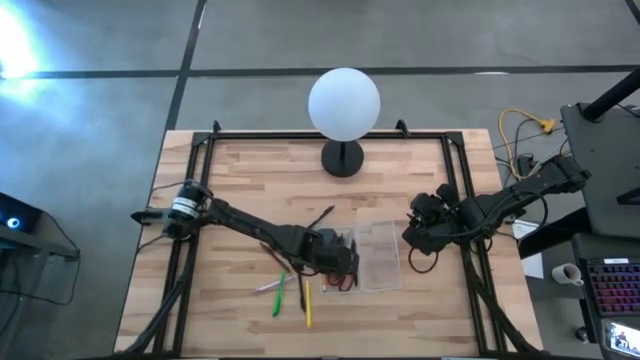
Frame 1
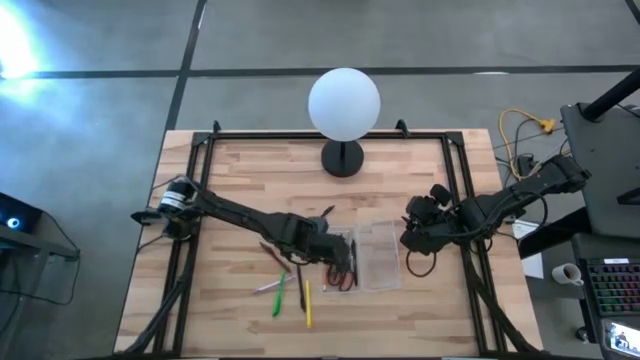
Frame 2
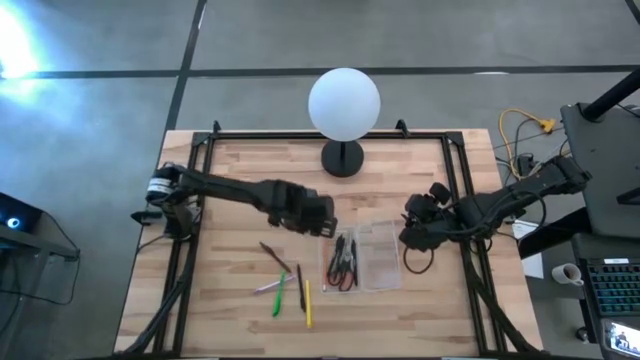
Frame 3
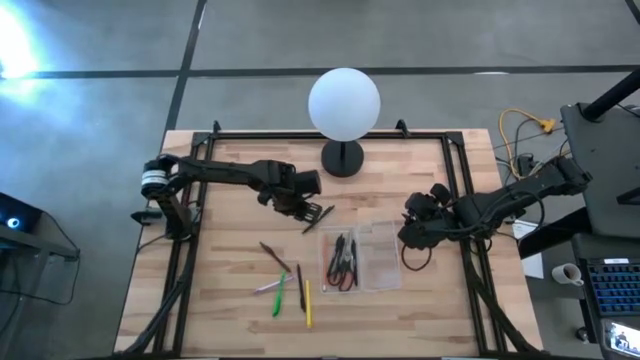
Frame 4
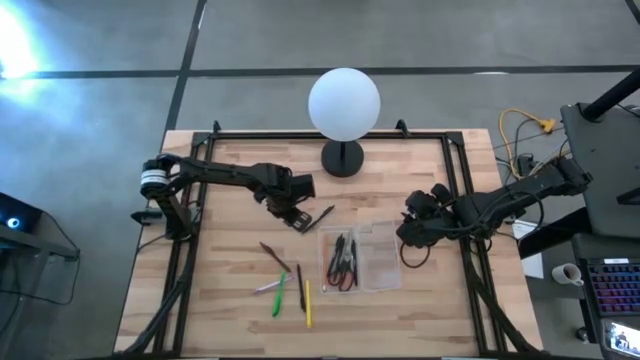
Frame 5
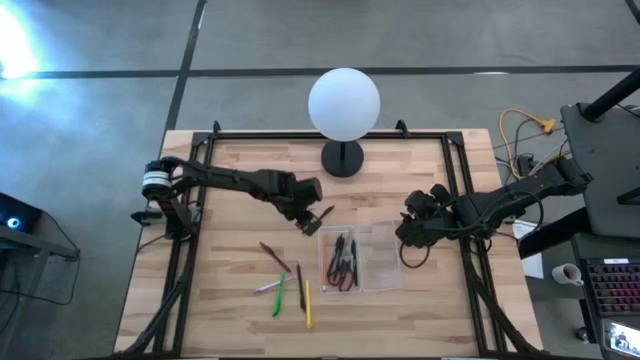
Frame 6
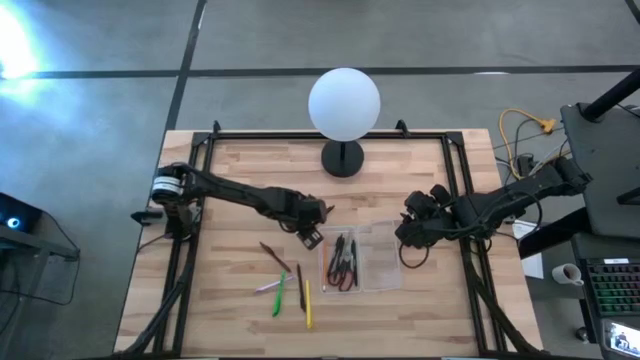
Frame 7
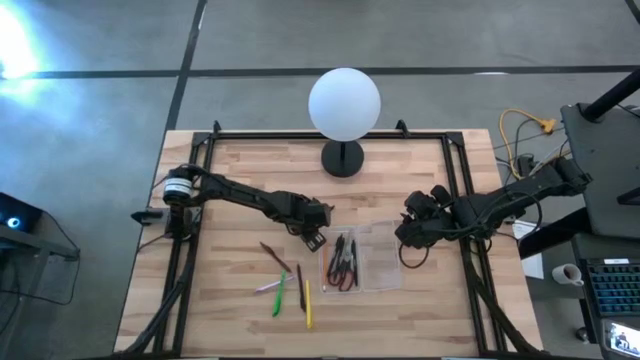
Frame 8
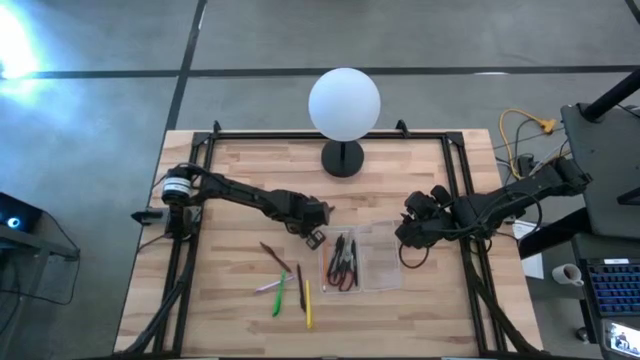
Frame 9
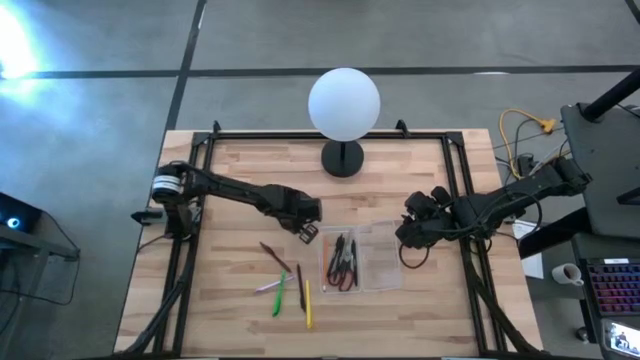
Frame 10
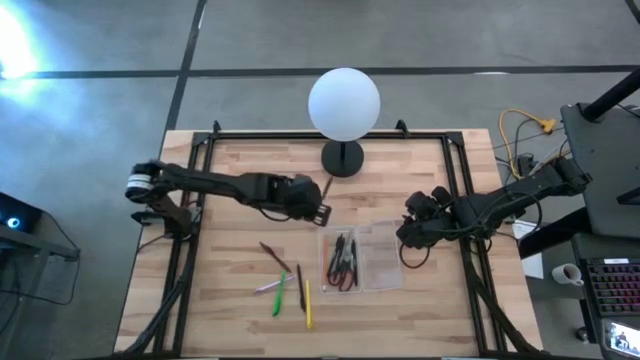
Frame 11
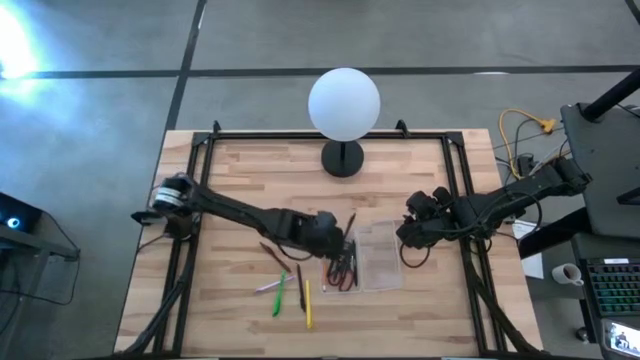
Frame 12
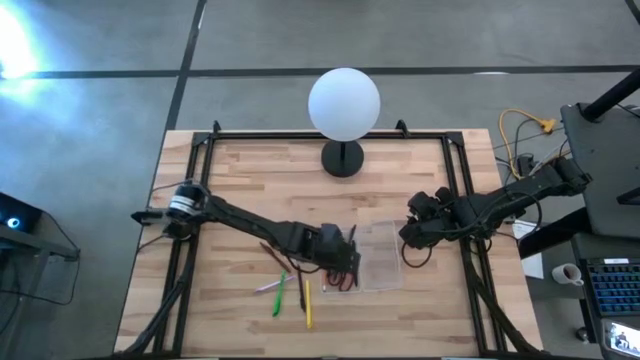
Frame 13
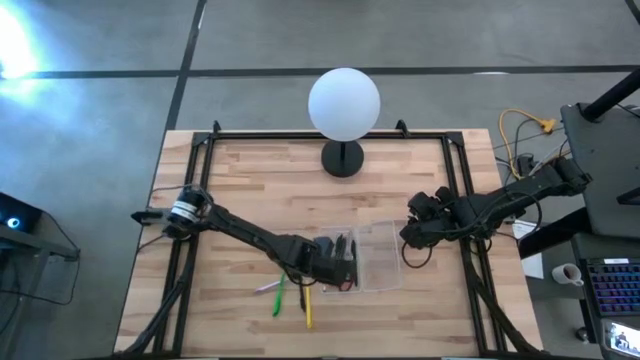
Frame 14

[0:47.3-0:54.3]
Task: Pick & place school supplies into a supply box
Put the top black pen into the transparent supply box

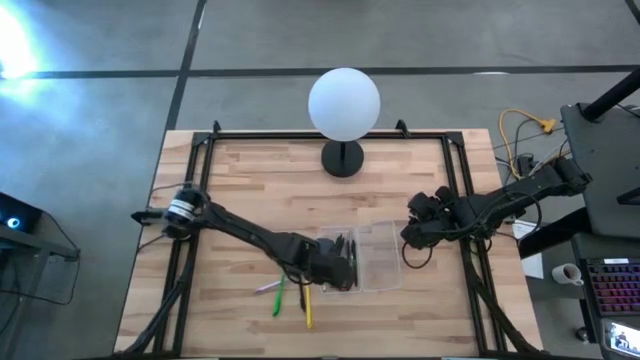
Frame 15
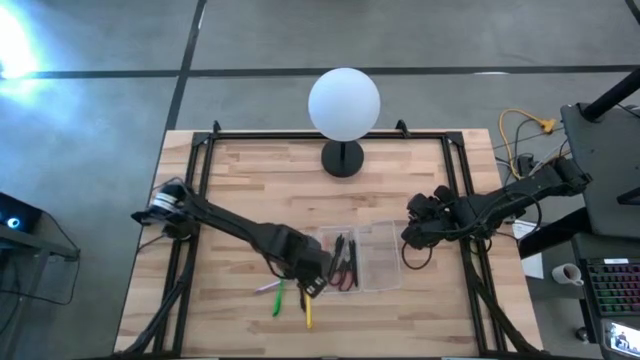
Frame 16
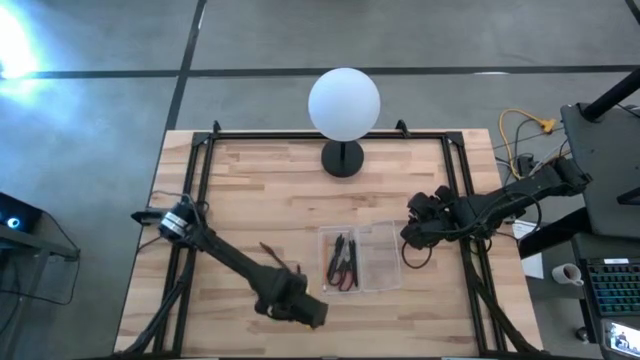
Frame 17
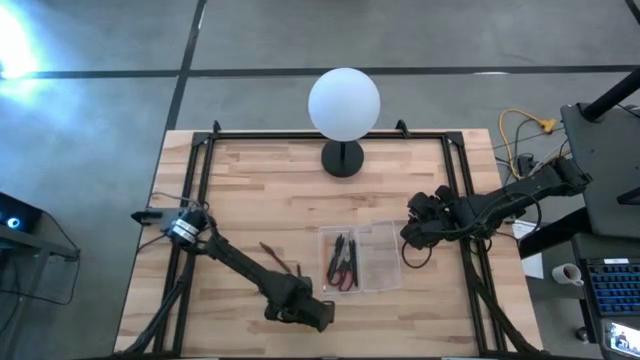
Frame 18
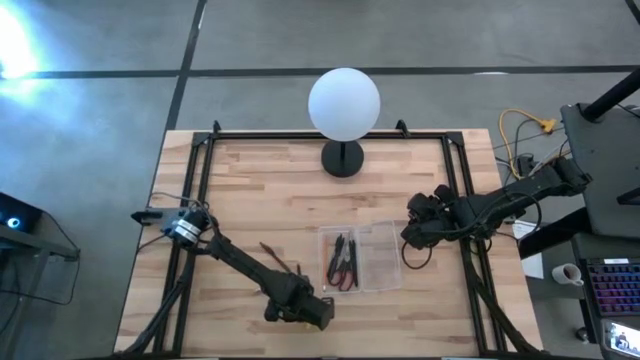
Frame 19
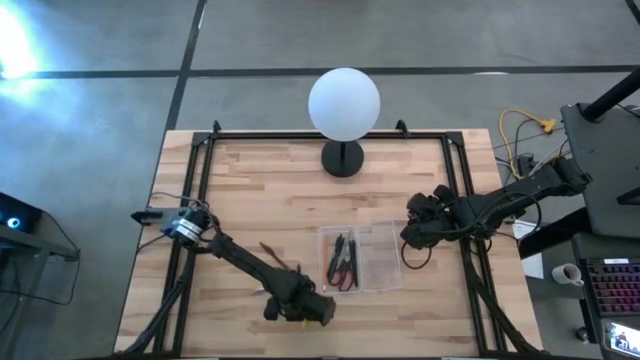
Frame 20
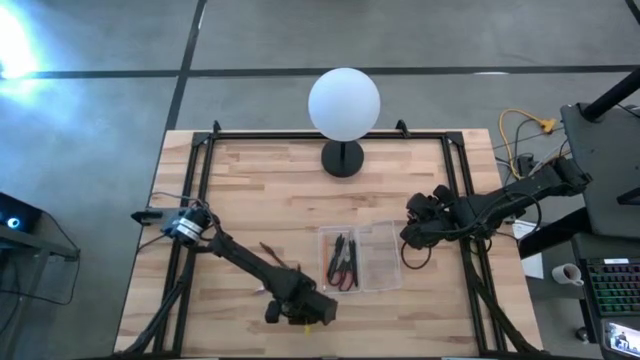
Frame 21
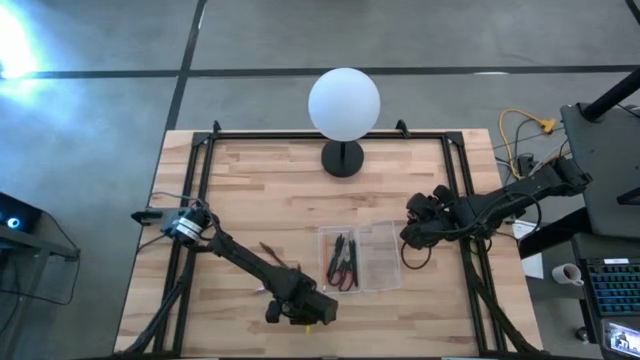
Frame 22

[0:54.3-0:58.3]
Put the yellow pen into the transparent supply box

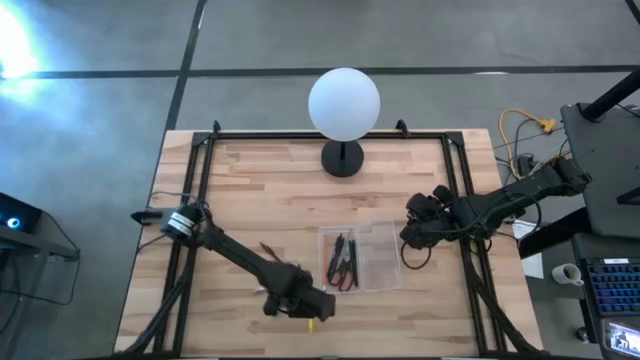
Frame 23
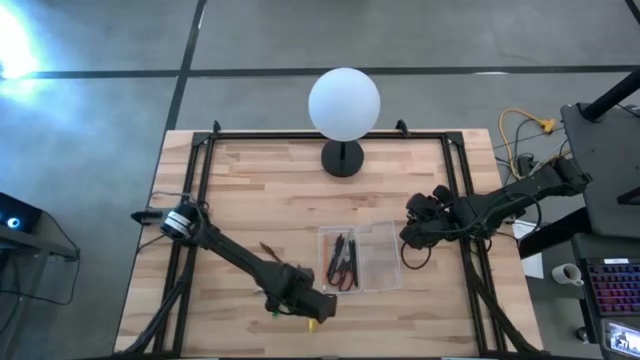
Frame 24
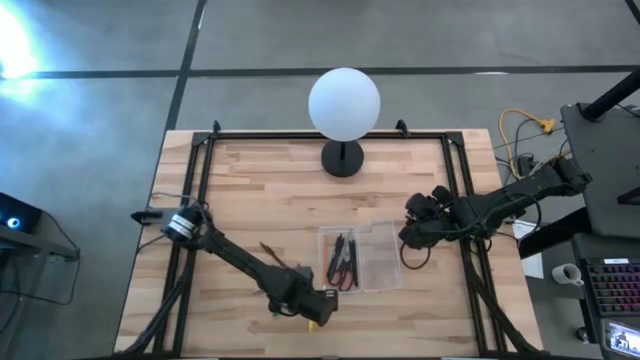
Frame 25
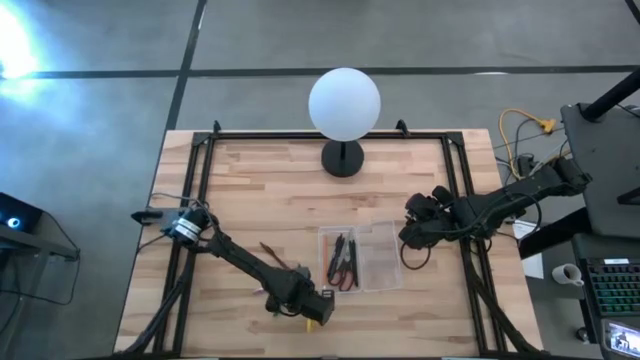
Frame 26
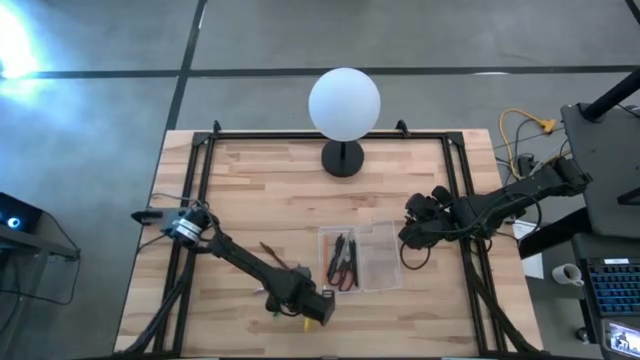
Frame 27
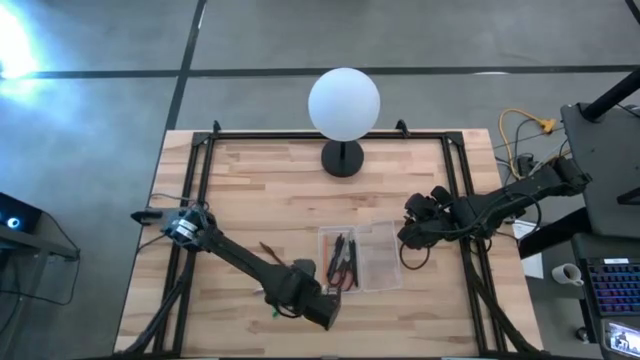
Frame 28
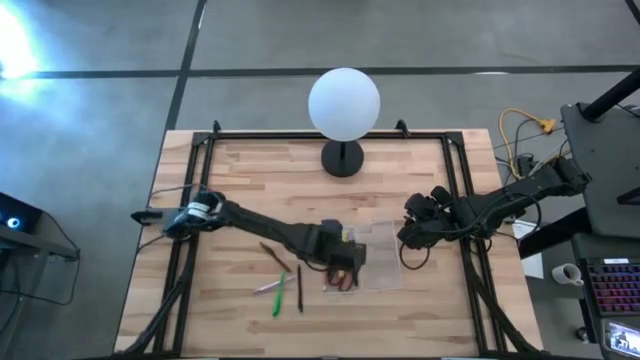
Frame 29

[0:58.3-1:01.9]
Put the yellow pen into the transparent supply box

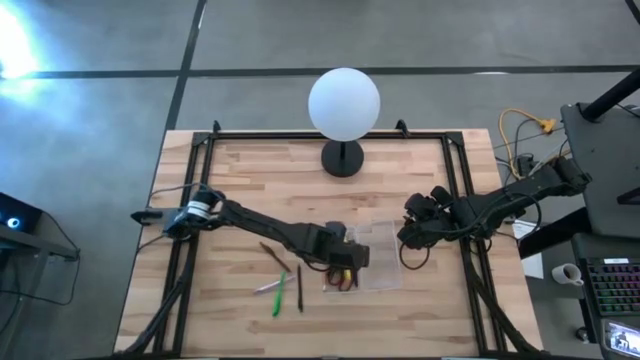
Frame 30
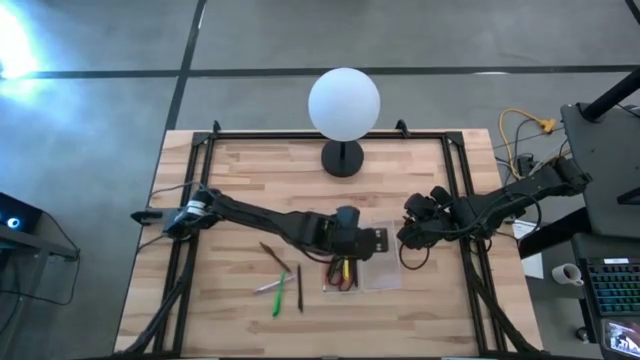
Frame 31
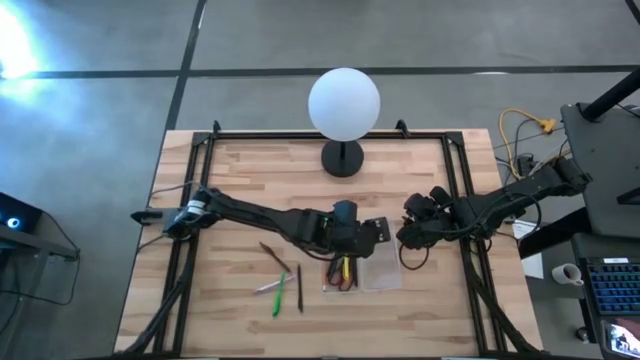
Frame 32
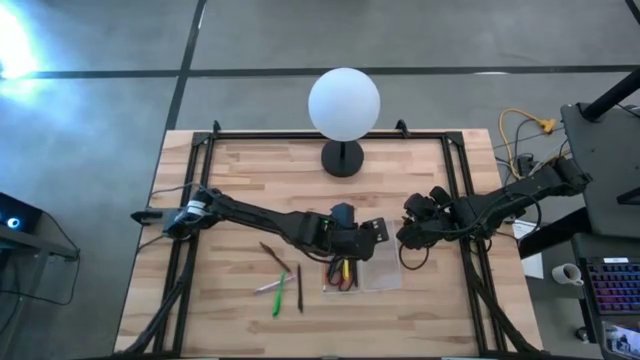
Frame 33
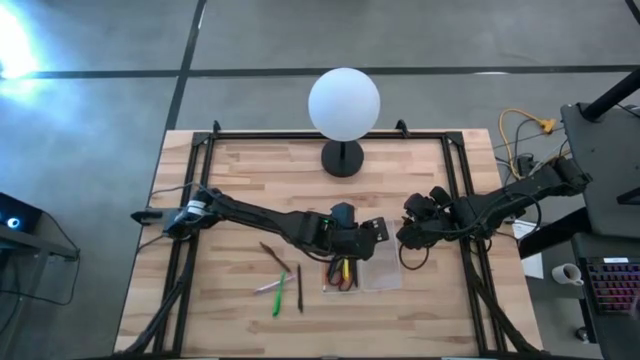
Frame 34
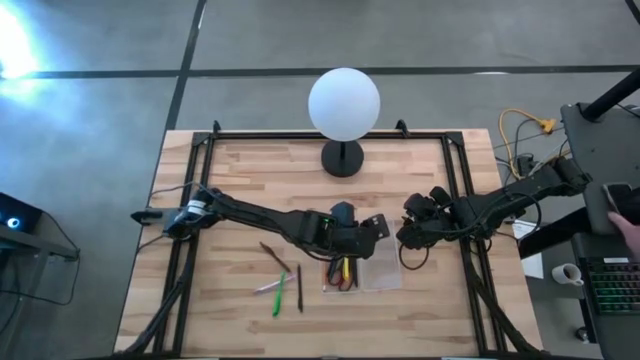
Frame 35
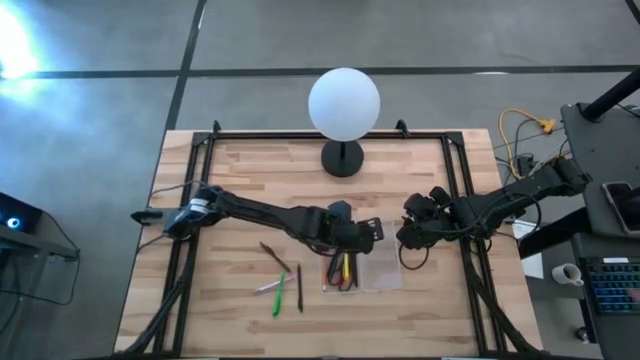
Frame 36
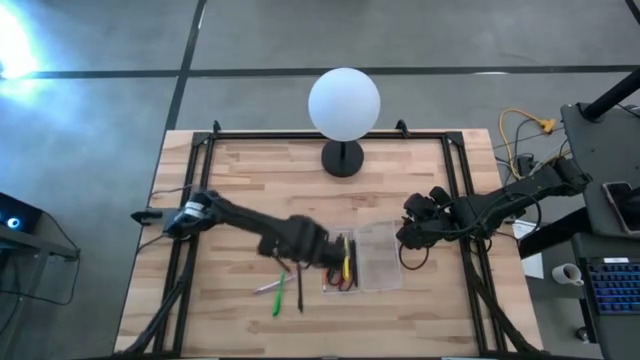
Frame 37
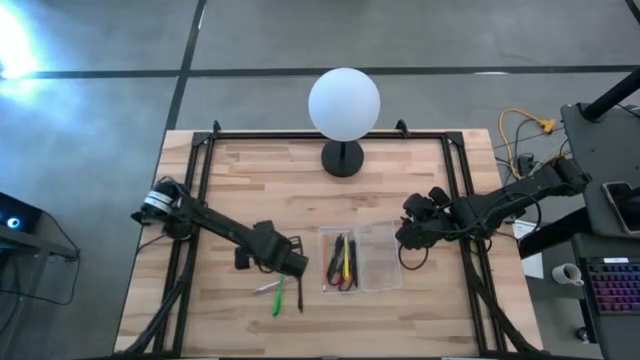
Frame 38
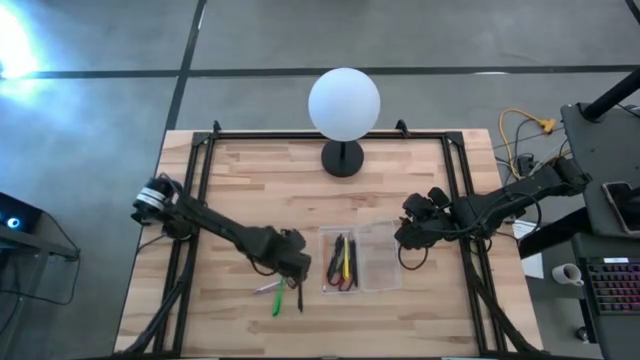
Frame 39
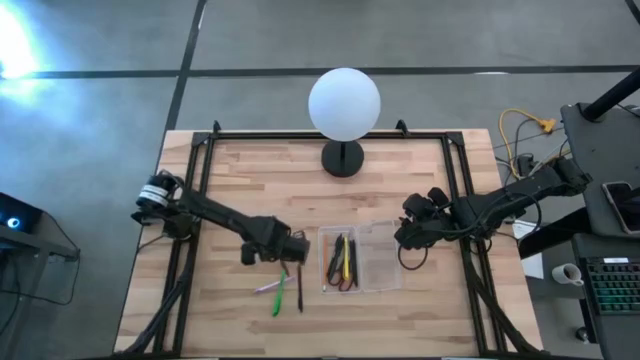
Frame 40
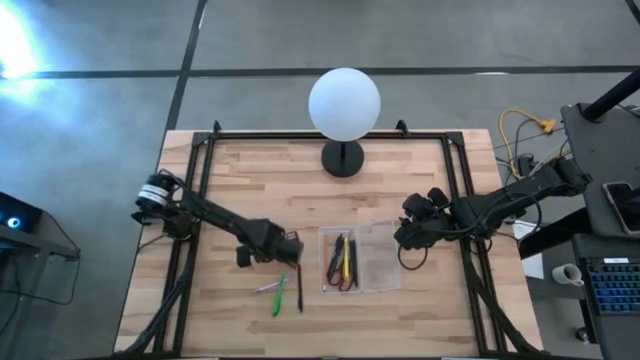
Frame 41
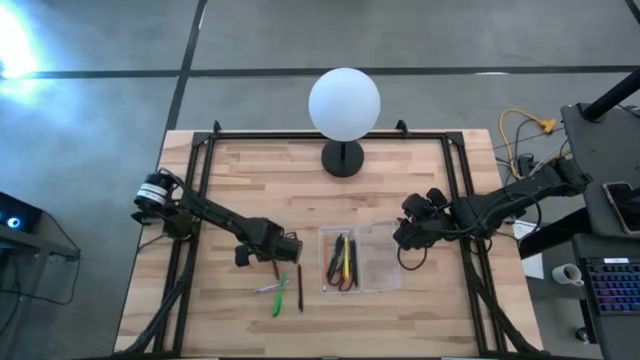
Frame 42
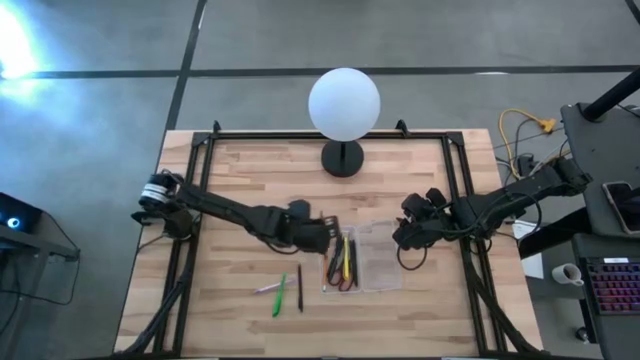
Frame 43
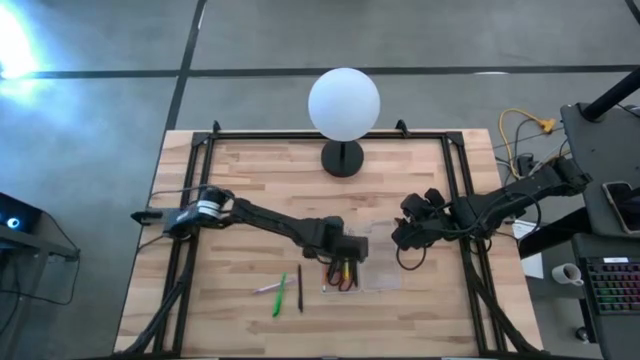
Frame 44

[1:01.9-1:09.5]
Put the brown pen into the transparent supply box
